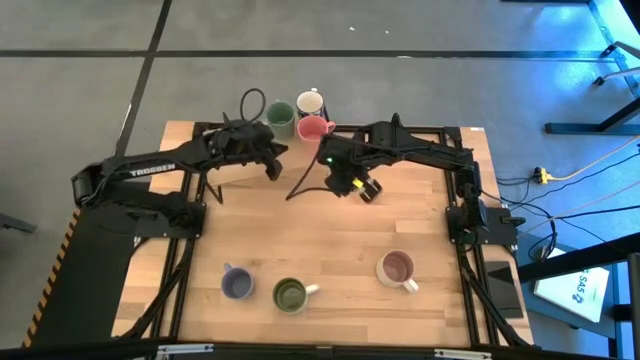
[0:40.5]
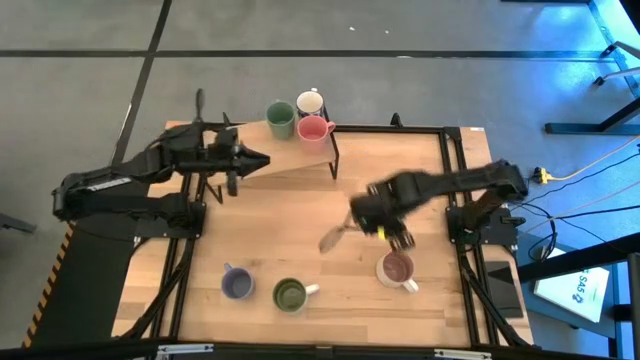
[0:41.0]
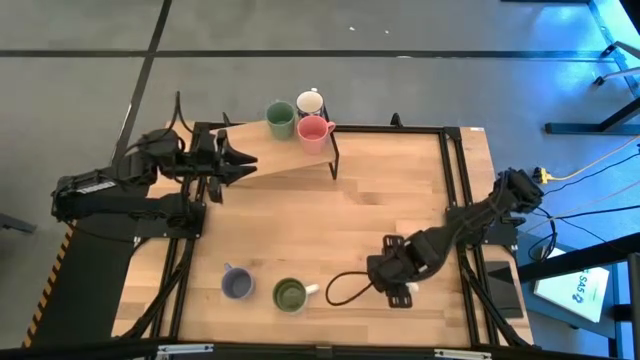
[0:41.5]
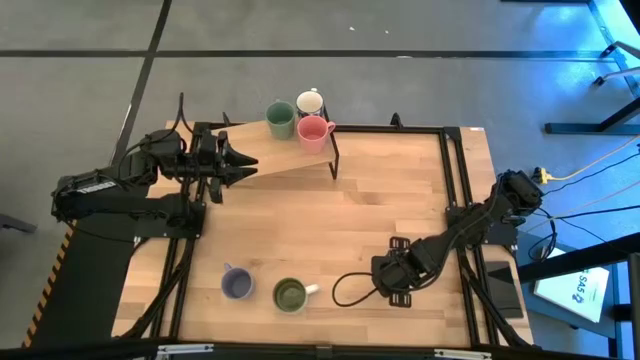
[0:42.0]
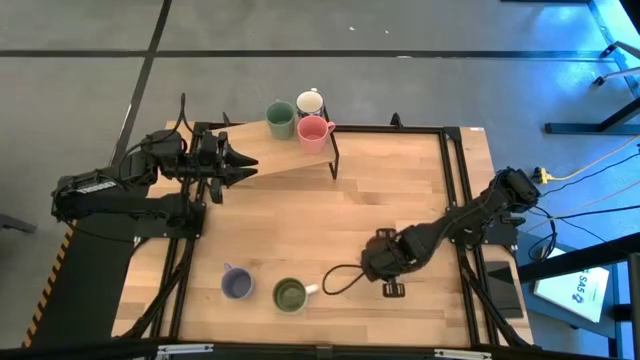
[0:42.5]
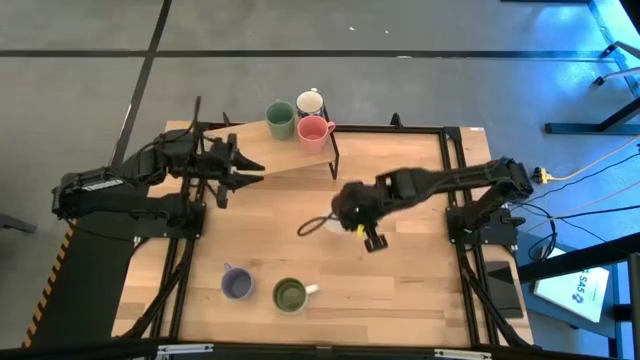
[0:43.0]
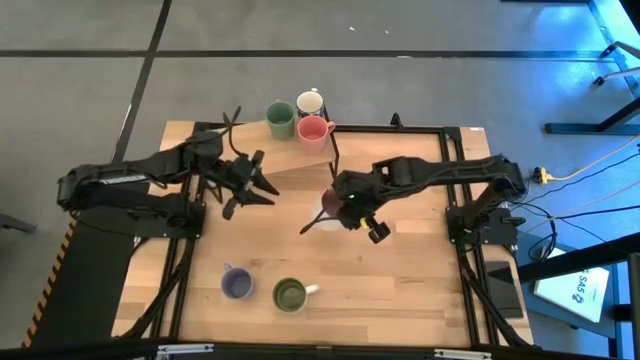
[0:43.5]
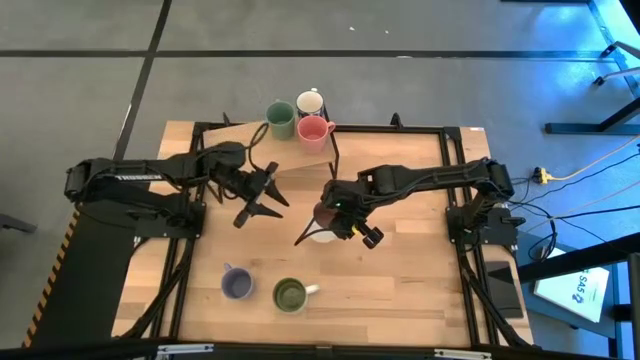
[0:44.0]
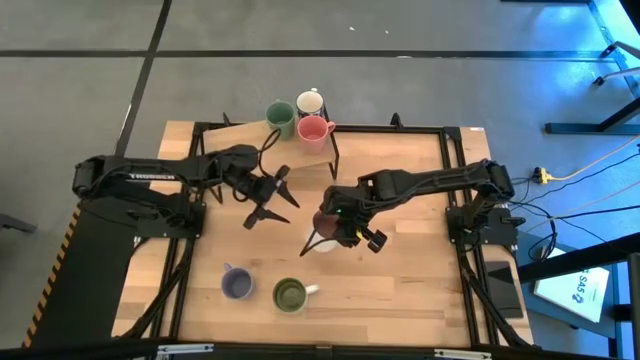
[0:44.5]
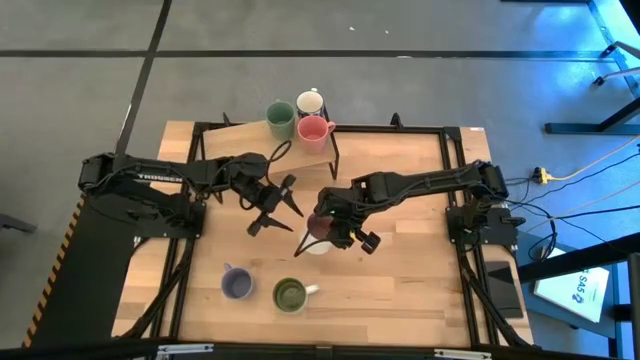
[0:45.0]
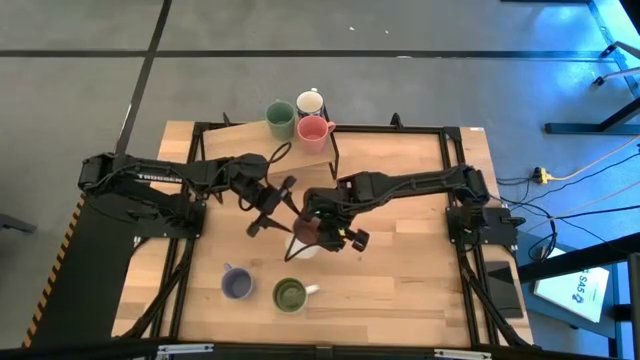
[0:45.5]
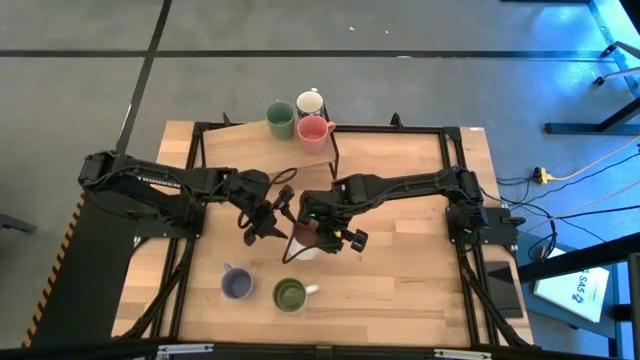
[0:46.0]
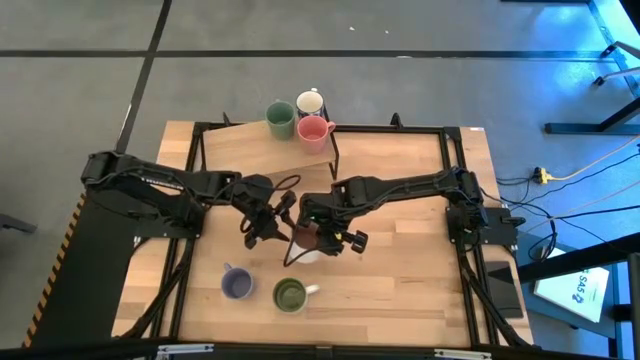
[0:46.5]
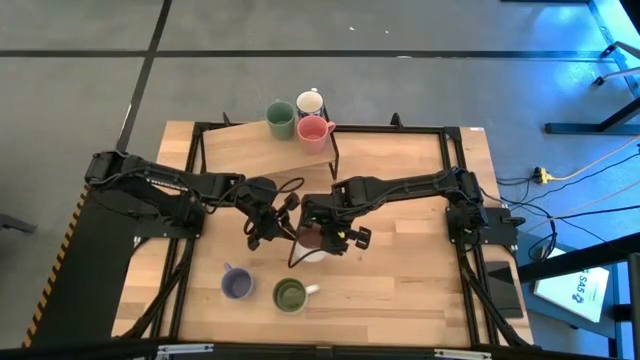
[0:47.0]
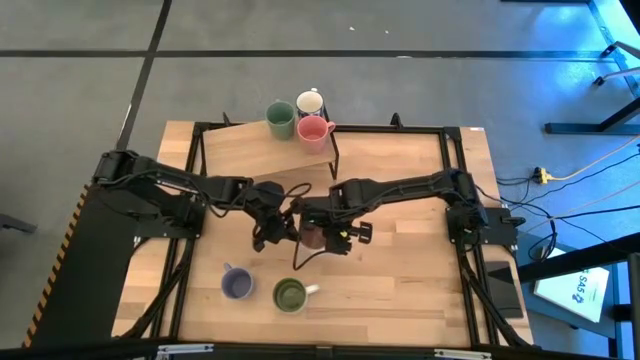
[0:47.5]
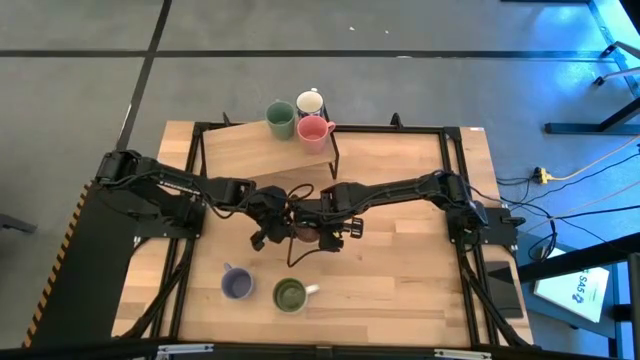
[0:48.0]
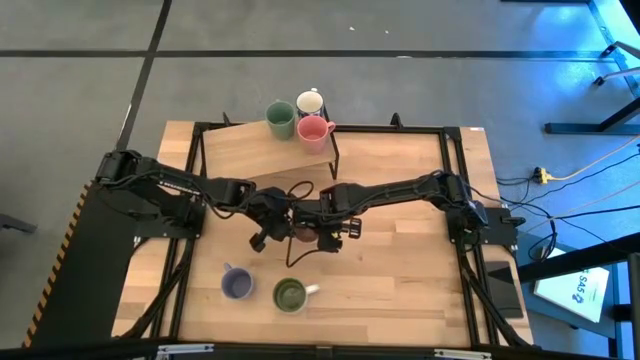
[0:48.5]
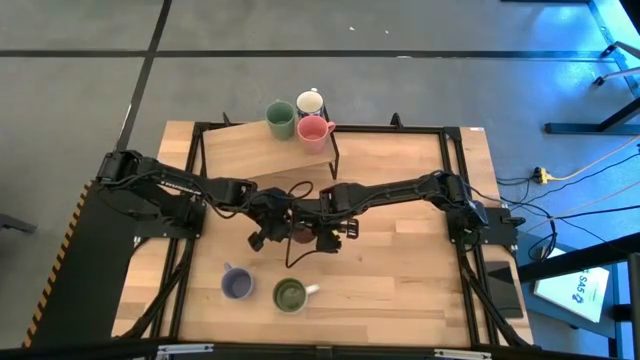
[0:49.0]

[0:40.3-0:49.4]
Task: Place coffee mugs
Put the light brown mug on the shelf

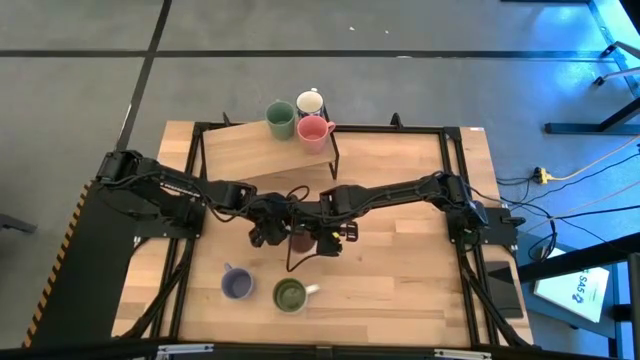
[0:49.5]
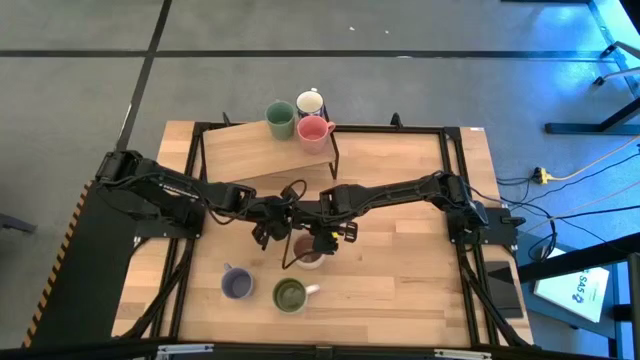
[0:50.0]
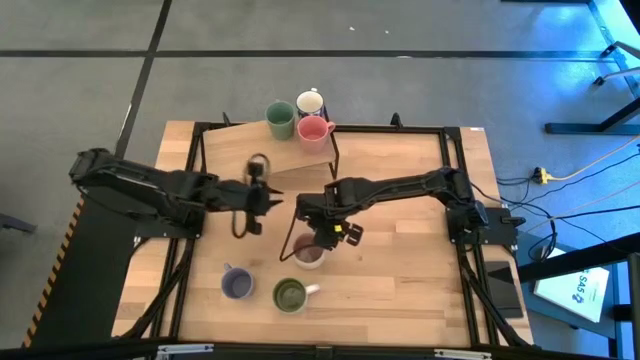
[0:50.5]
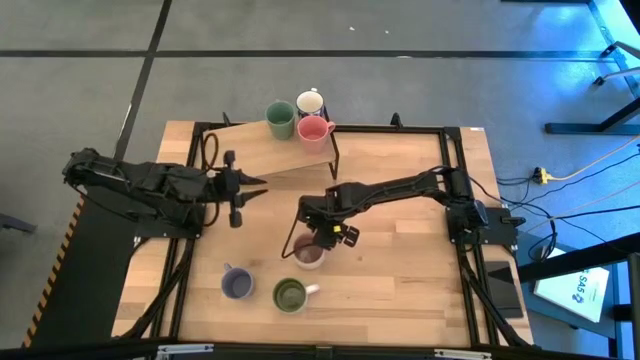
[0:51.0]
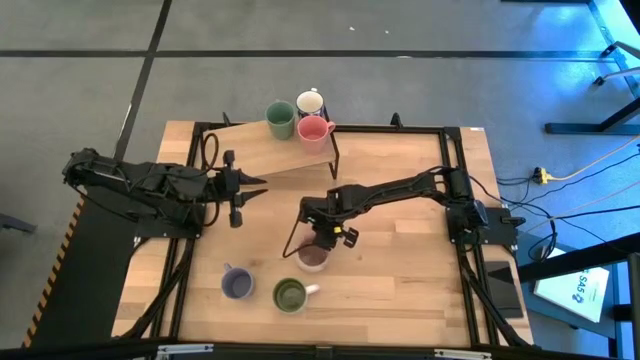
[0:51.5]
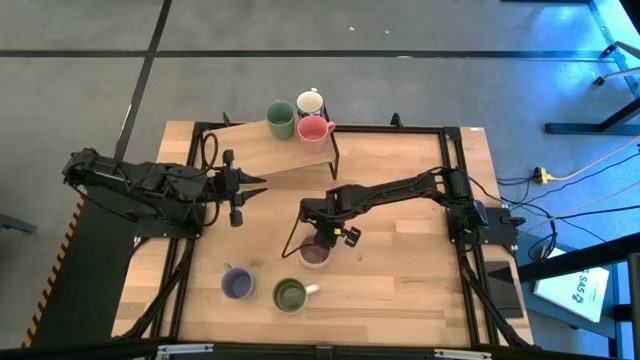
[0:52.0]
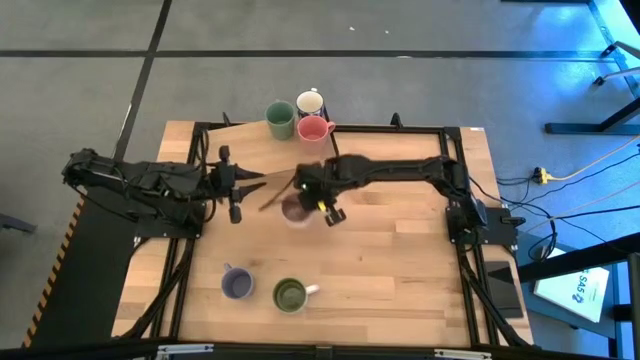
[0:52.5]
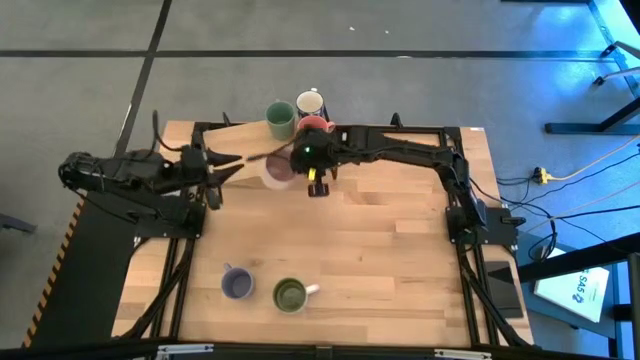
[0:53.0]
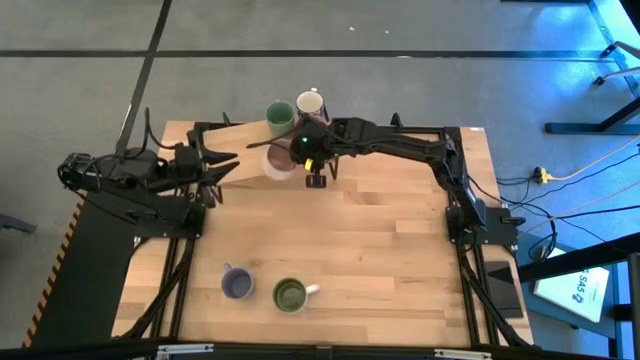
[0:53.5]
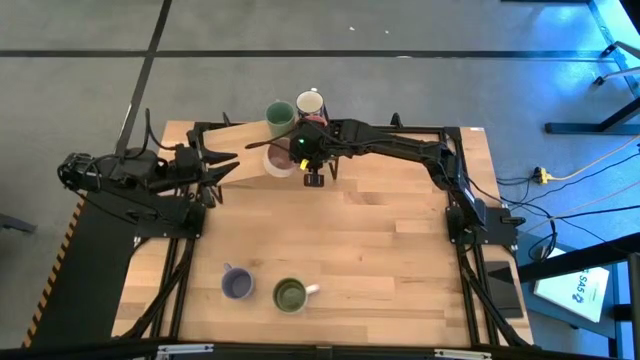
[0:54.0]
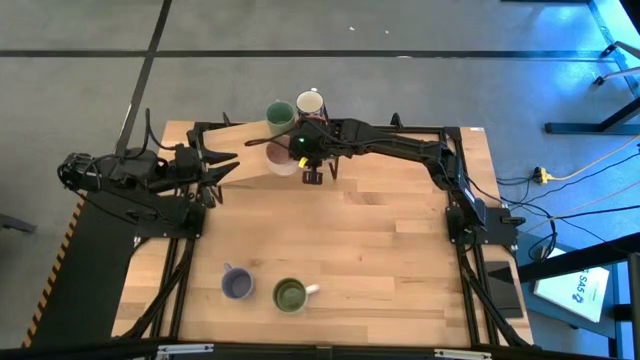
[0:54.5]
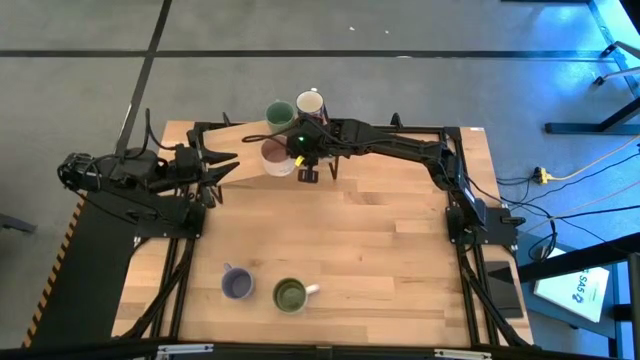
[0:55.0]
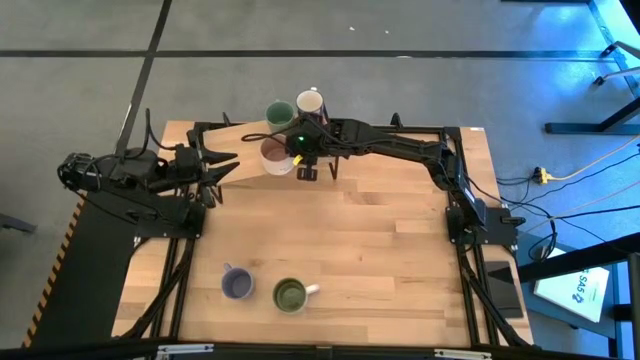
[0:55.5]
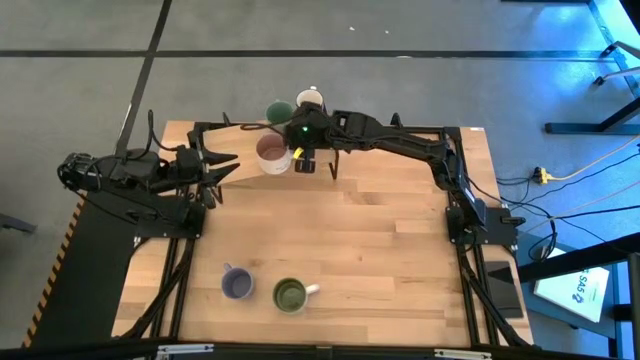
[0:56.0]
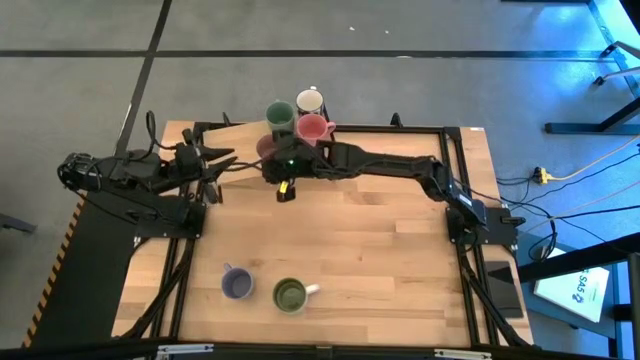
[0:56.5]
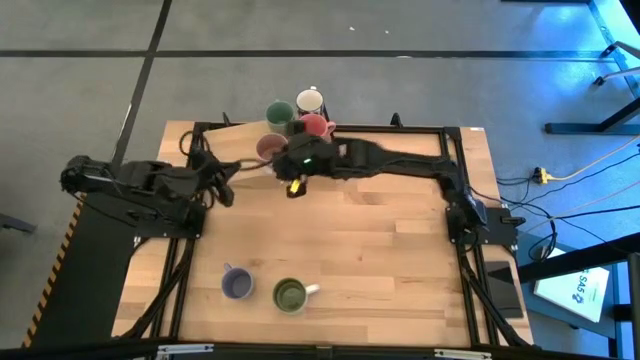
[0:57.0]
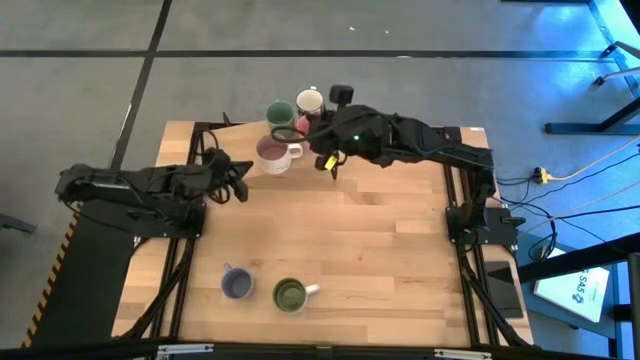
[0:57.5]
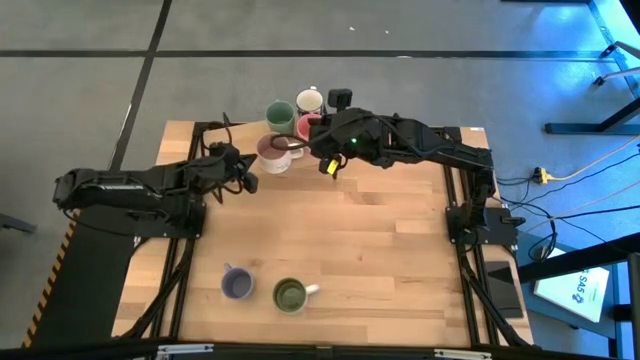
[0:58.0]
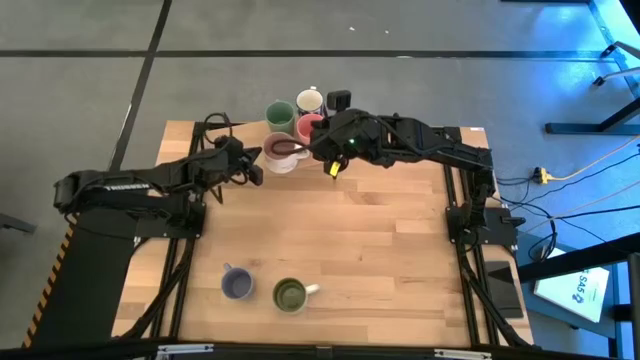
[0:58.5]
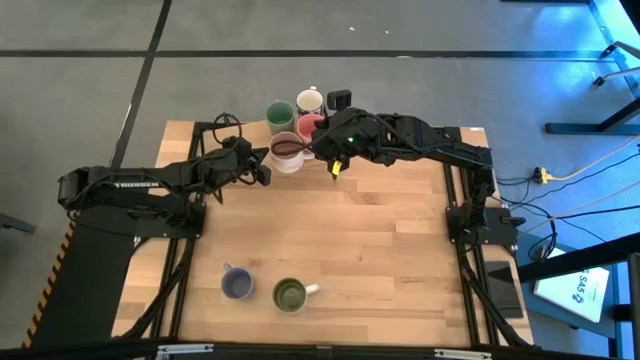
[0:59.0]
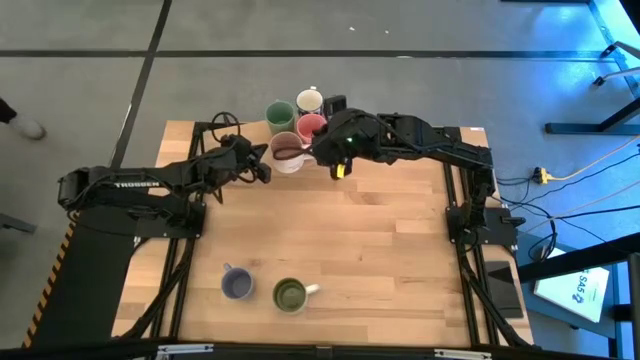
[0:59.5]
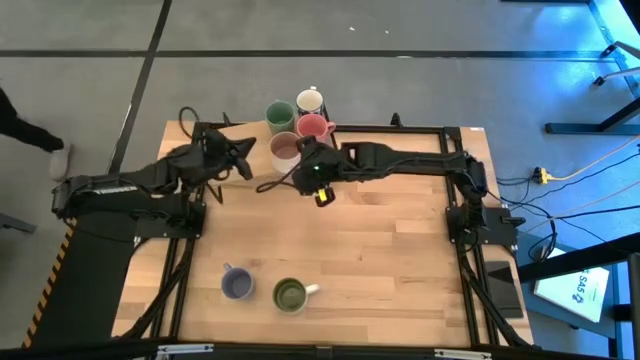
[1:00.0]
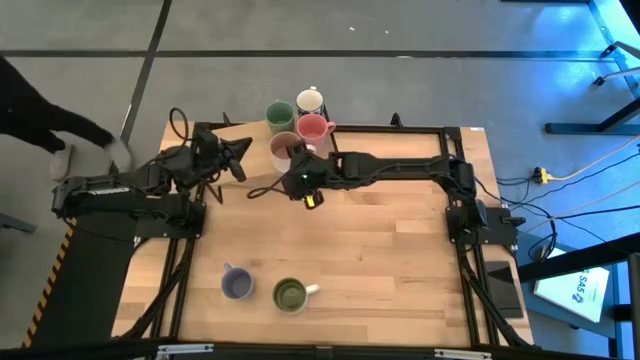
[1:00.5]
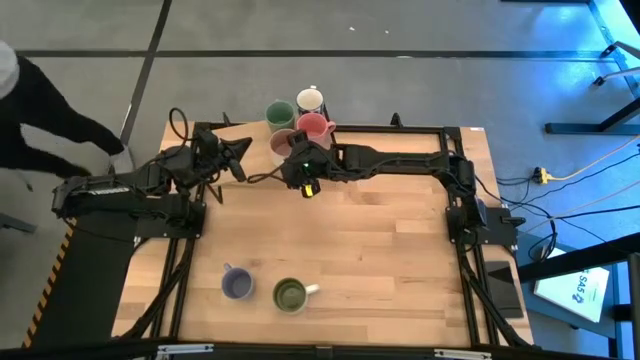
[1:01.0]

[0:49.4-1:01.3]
Put the light brown mug on the shelf

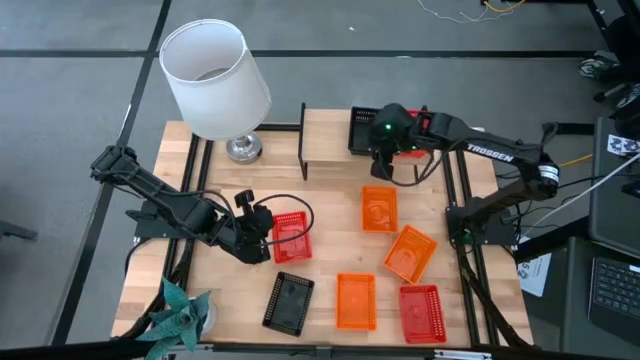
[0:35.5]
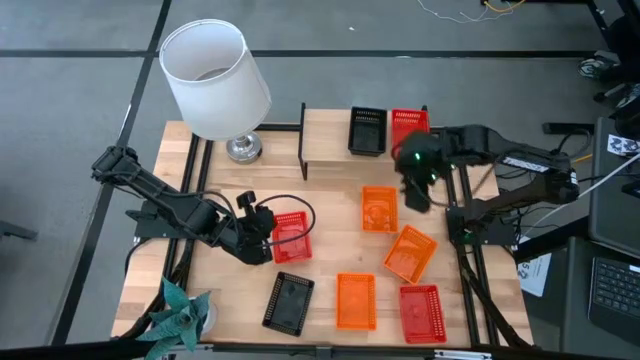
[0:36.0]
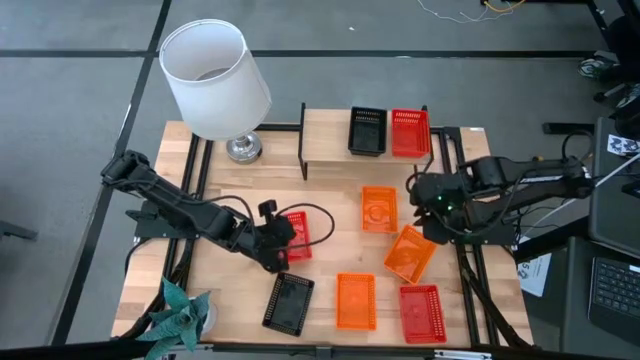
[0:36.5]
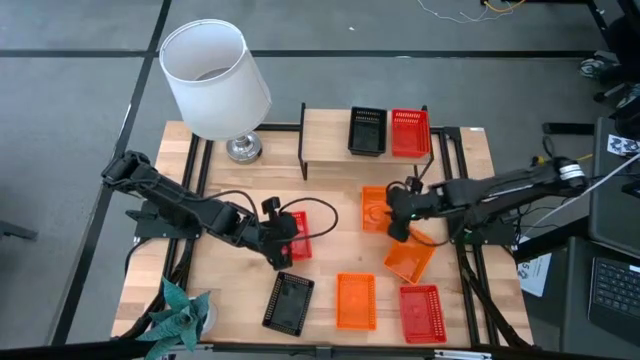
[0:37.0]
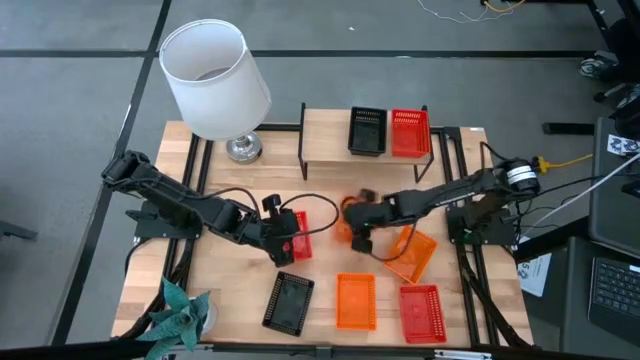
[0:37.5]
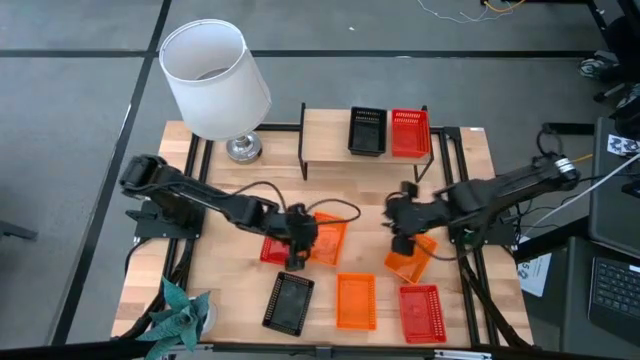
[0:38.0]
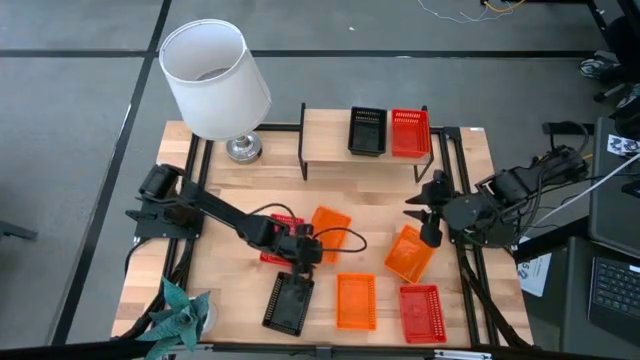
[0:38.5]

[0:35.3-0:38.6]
Task: Stack baskets on shelf by color
Put the top left orange bin on the shelf
